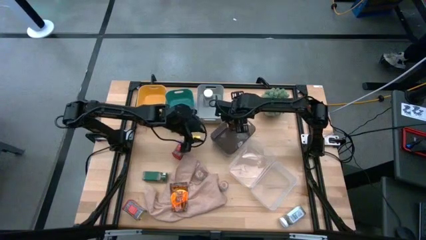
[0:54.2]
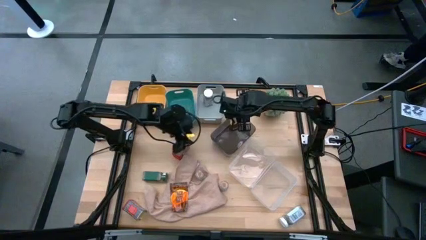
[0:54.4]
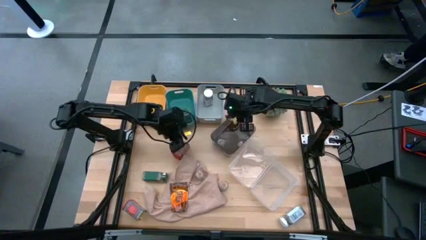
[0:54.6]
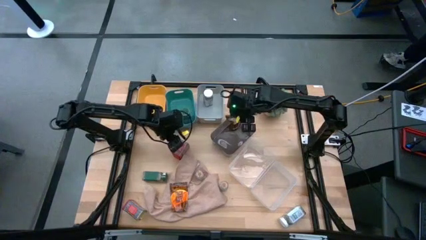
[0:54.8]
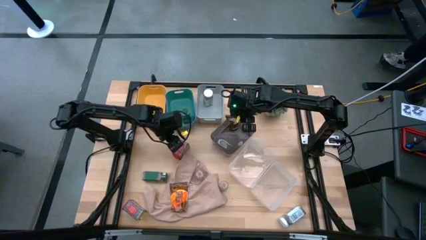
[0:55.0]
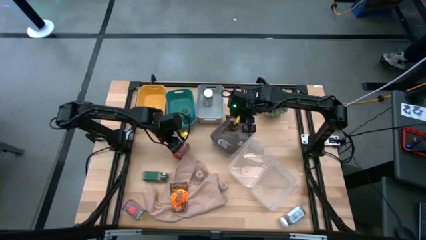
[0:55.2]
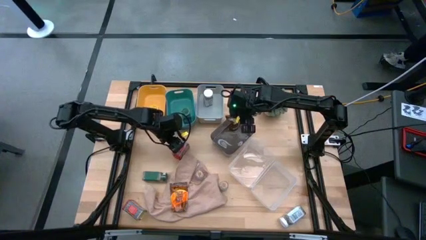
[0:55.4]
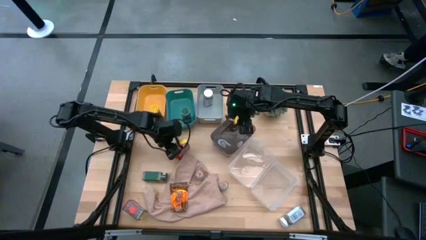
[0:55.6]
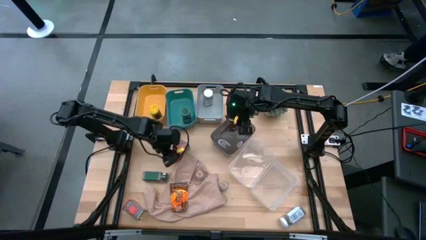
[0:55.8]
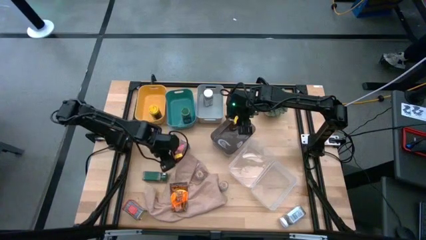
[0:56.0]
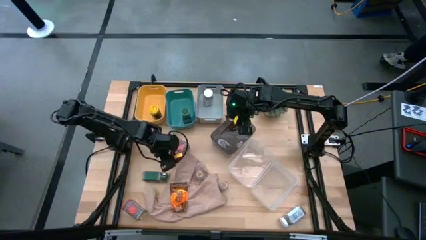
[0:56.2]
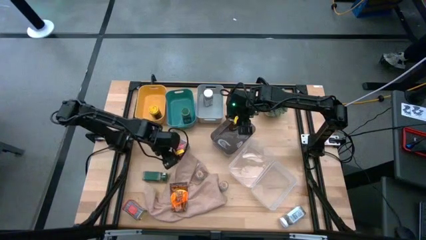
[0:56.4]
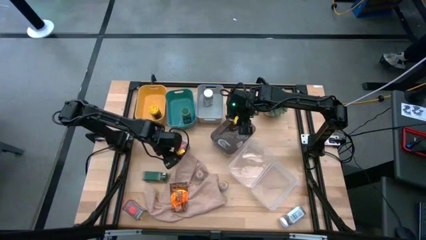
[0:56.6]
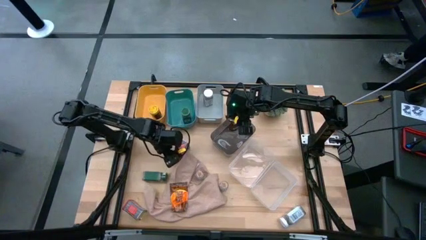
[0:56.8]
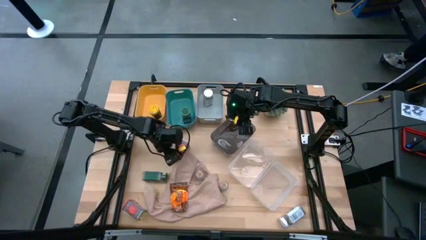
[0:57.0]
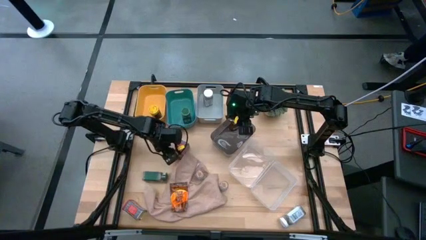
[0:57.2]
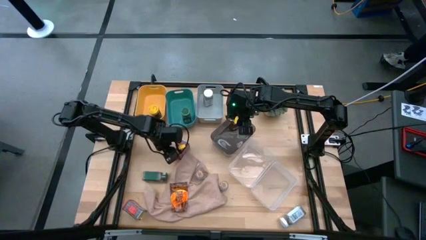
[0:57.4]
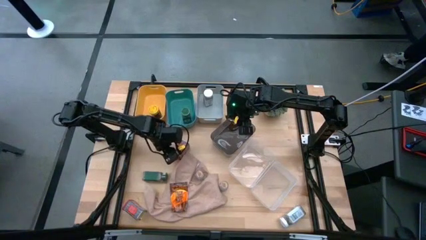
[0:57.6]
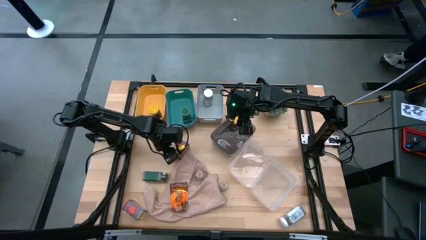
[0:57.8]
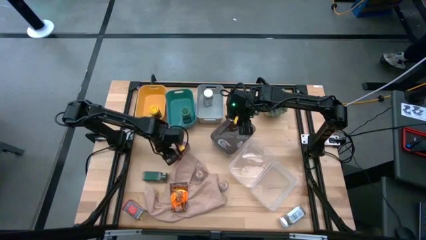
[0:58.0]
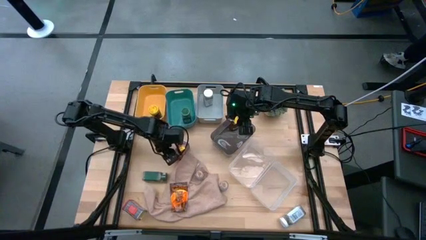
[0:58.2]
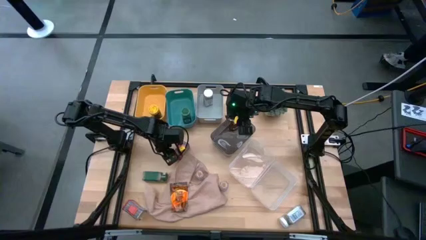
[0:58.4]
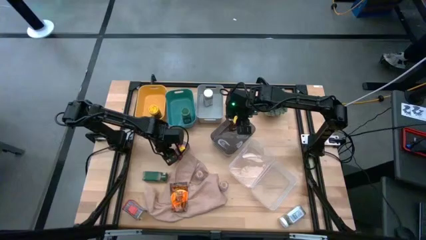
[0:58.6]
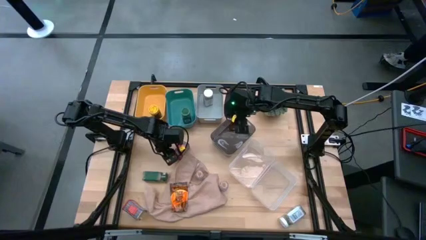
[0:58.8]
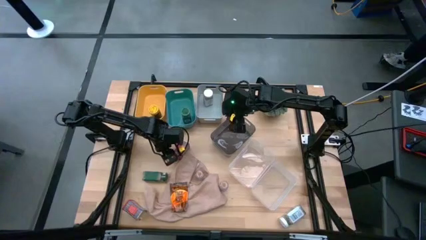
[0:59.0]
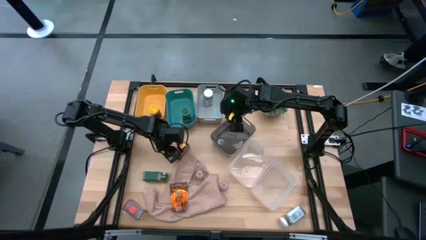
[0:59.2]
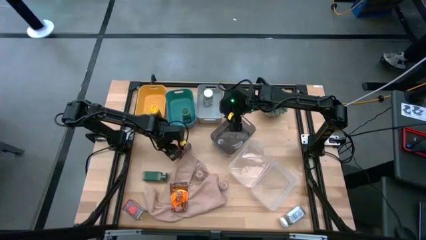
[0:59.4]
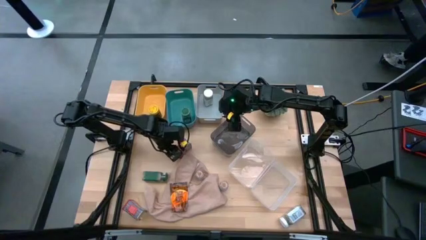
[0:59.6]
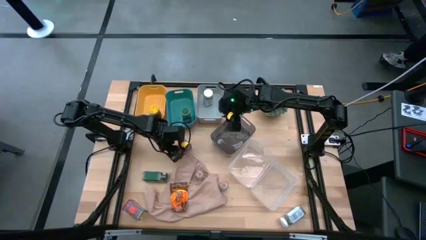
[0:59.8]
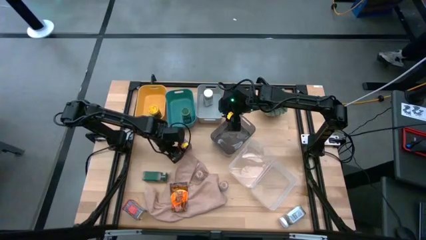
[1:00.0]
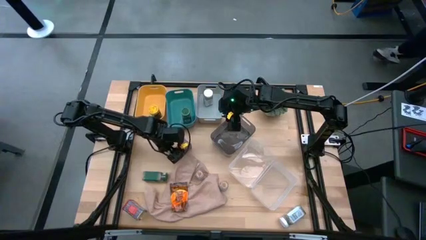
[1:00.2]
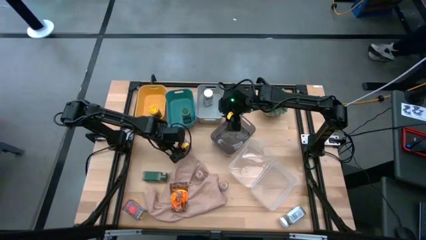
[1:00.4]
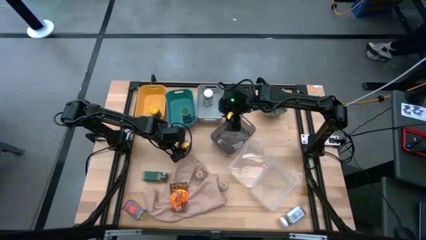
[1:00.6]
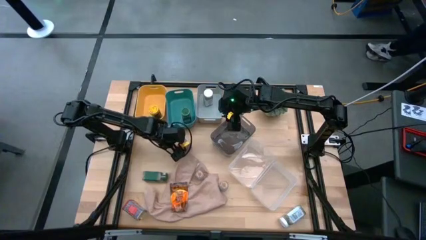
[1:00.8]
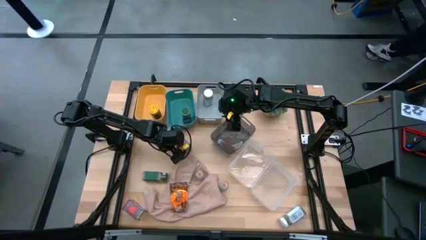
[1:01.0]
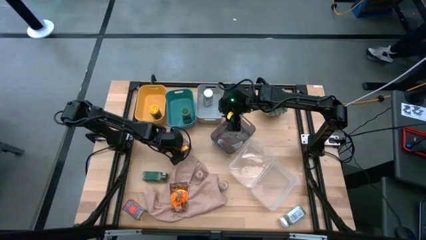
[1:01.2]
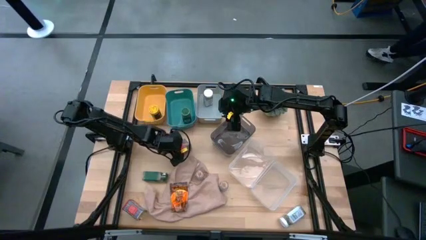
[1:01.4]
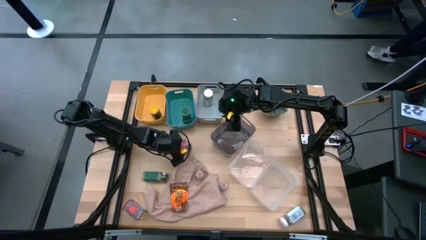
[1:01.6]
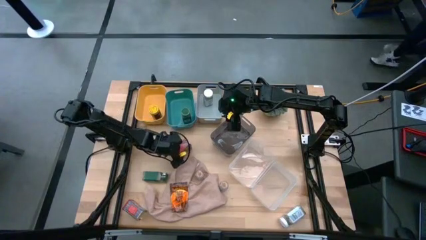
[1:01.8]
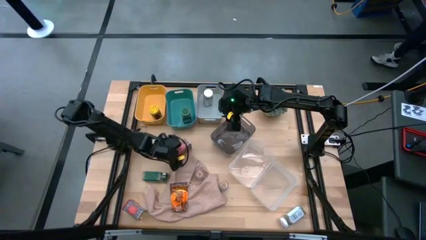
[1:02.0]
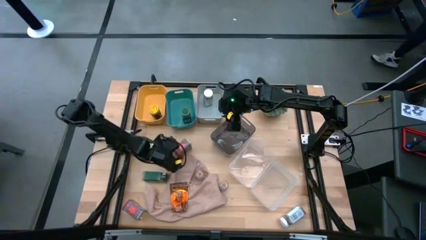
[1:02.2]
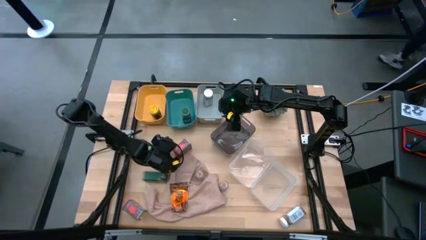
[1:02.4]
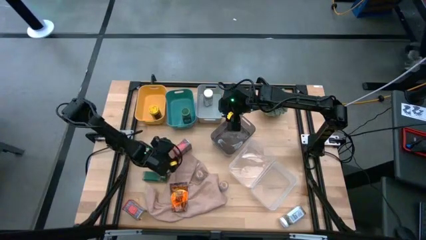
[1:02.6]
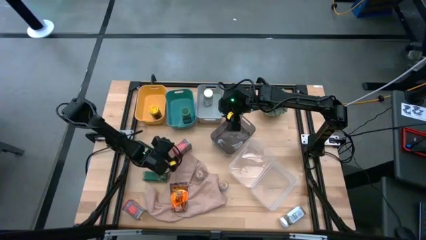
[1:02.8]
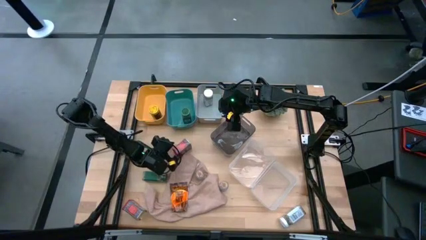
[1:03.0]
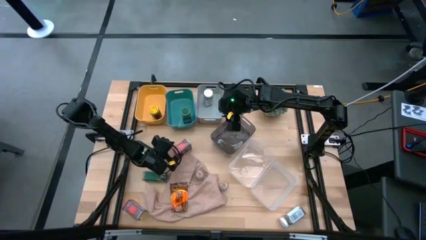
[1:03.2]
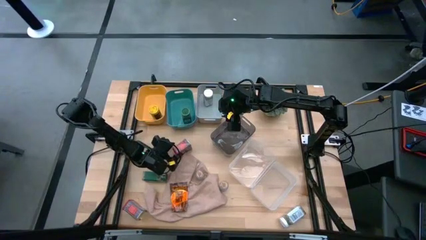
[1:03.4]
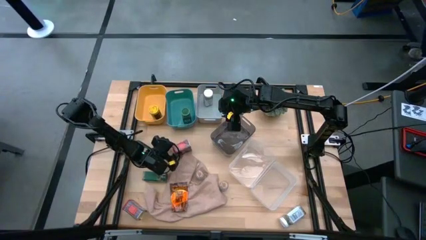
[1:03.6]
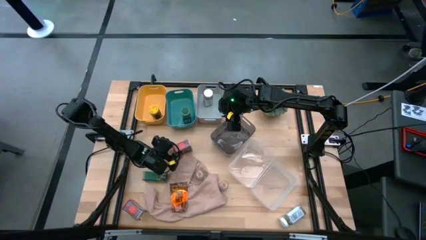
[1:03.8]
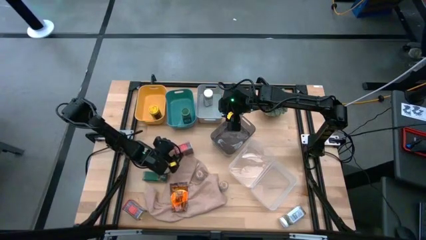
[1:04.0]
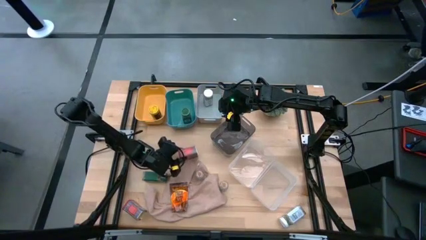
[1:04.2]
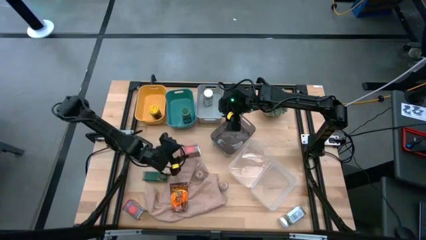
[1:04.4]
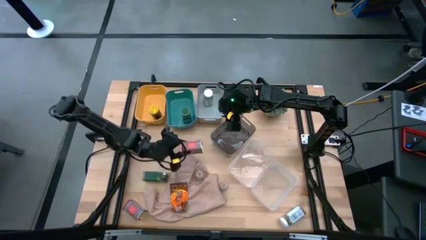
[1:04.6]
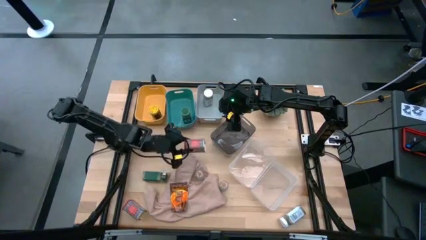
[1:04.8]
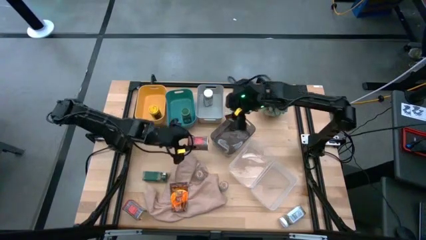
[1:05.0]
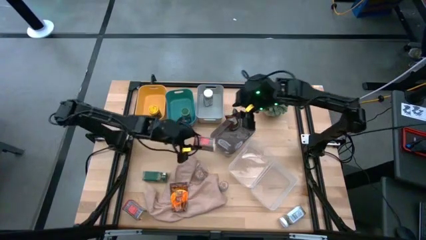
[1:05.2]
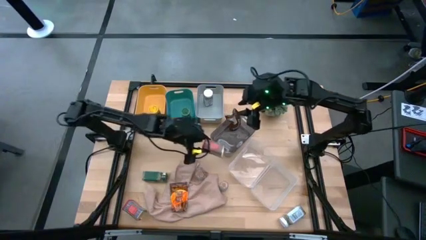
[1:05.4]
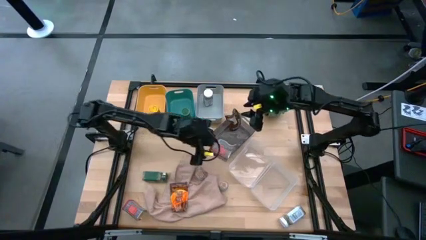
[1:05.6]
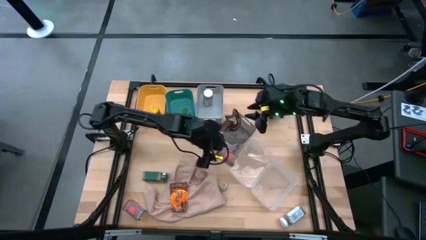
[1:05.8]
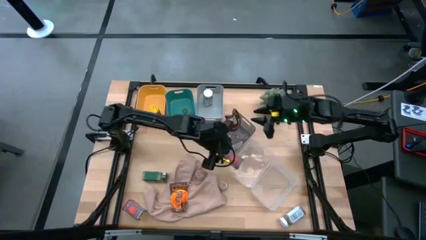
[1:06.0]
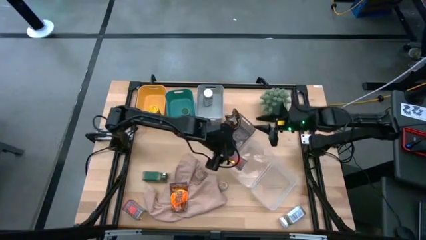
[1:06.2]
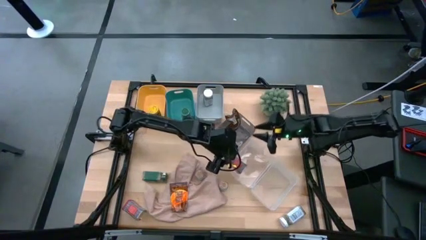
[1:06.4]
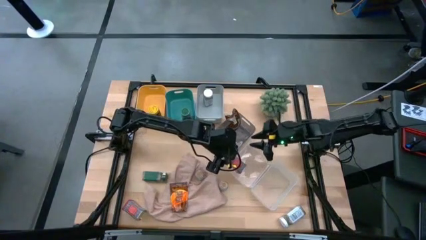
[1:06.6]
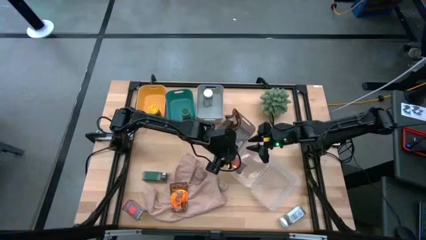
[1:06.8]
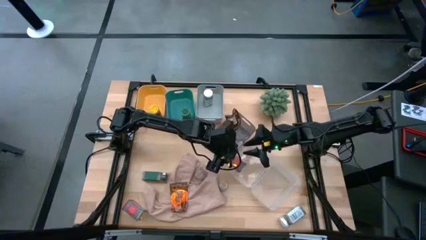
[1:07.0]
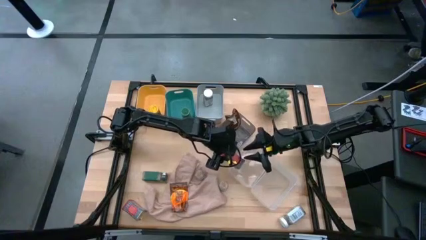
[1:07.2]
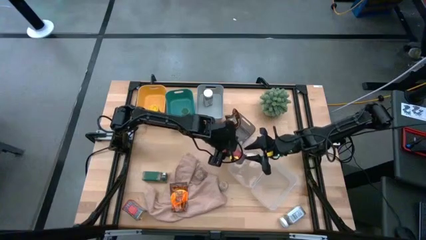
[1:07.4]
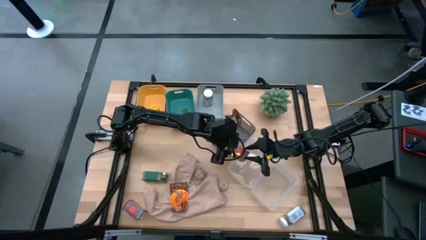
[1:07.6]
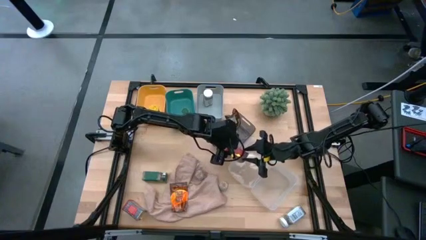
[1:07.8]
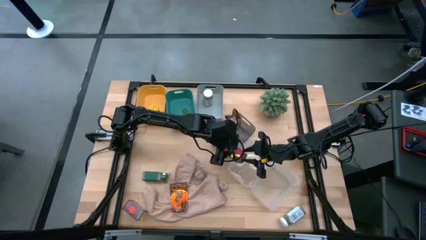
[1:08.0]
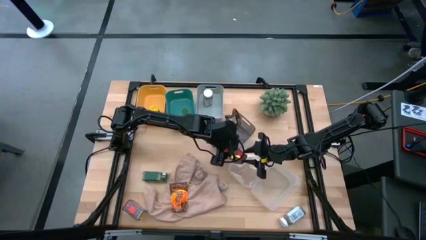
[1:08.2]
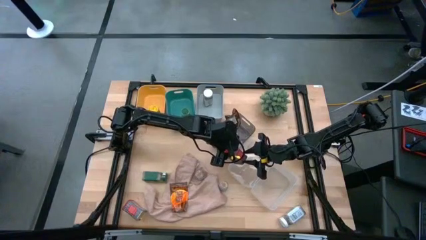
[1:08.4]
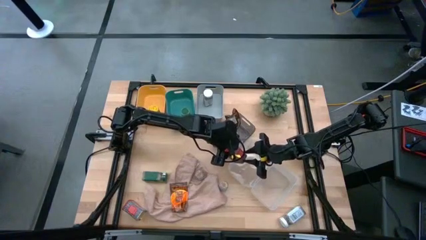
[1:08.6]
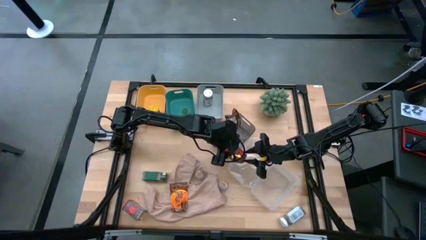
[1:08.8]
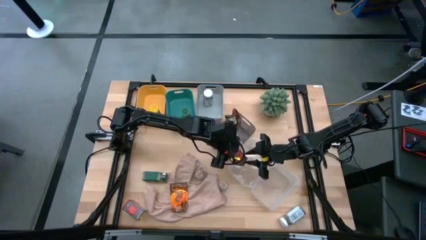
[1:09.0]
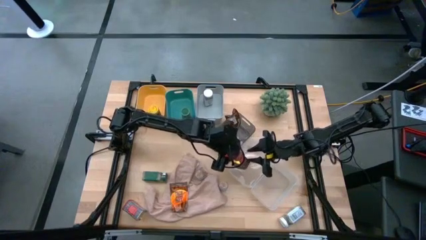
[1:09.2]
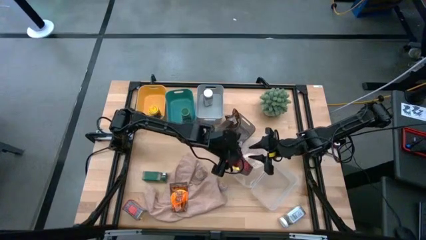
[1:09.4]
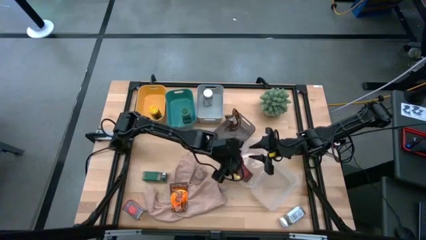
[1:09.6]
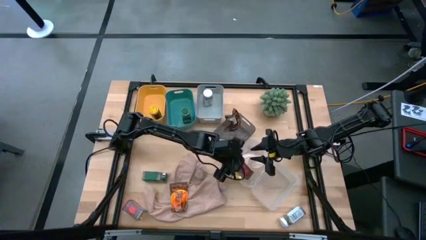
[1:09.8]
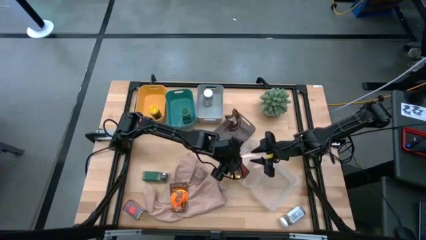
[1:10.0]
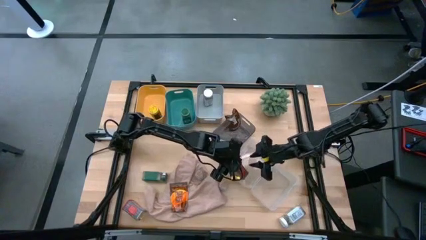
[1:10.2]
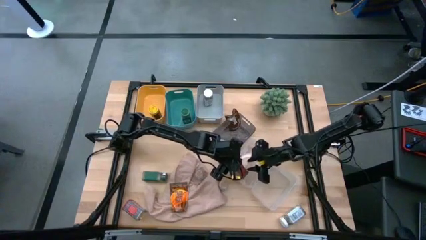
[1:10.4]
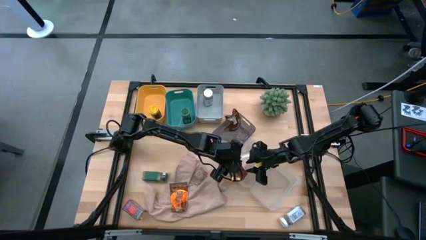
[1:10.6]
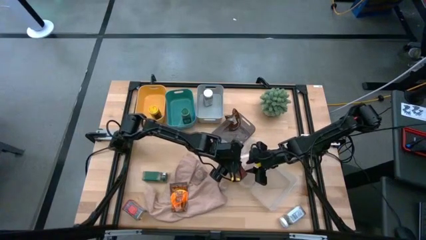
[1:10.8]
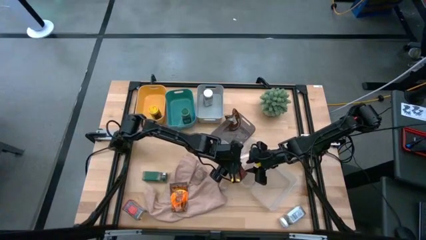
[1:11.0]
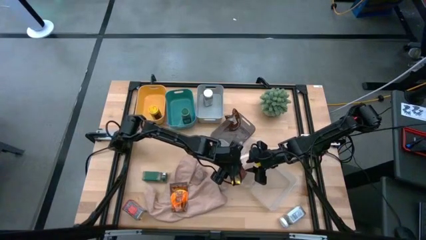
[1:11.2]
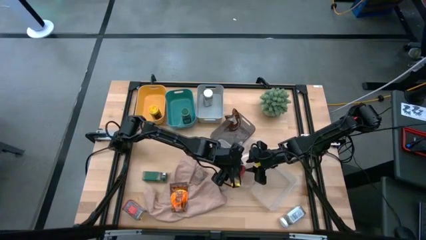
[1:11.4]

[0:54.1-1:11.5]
Task: Sort spices by type
Put the top red seasoning can into the left transparent bin
